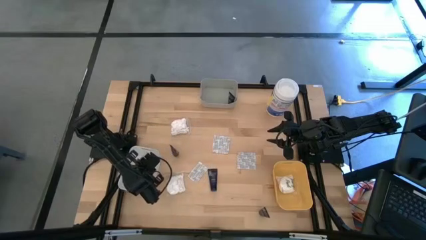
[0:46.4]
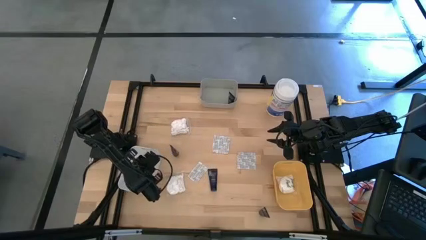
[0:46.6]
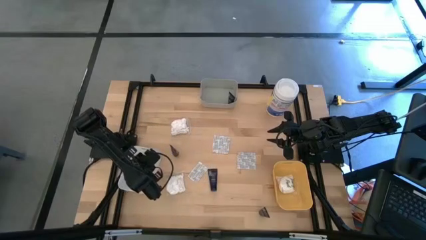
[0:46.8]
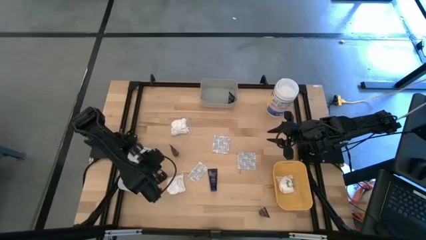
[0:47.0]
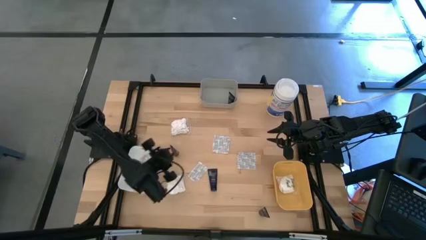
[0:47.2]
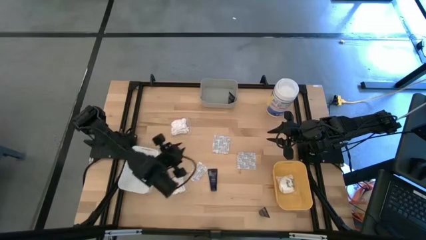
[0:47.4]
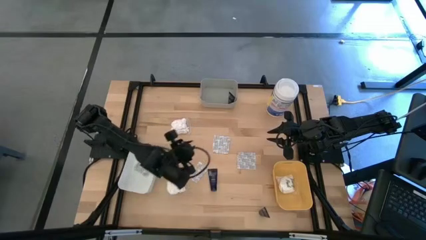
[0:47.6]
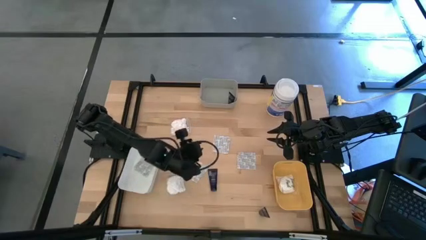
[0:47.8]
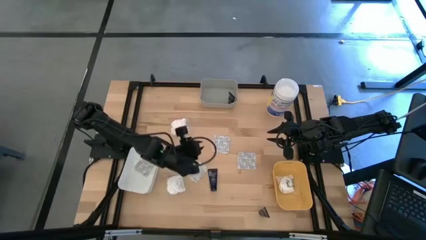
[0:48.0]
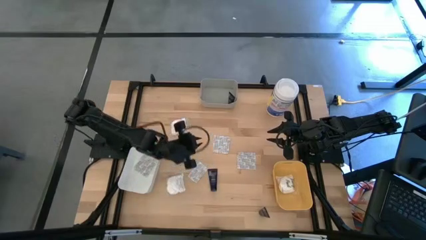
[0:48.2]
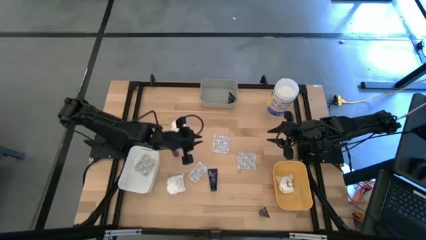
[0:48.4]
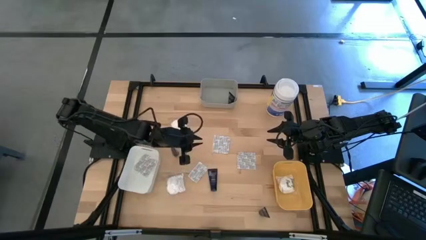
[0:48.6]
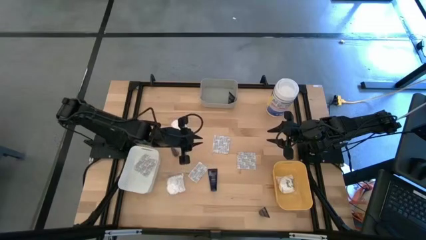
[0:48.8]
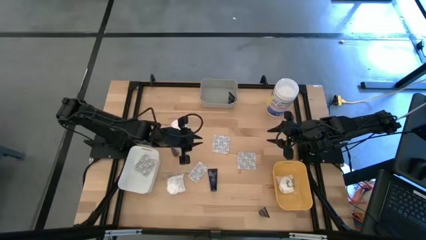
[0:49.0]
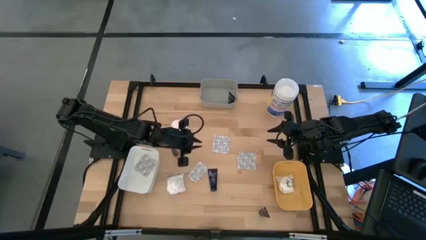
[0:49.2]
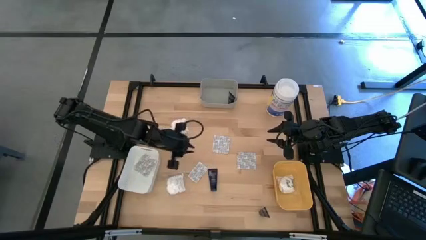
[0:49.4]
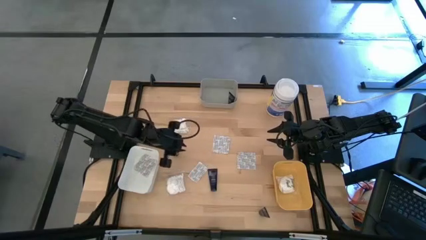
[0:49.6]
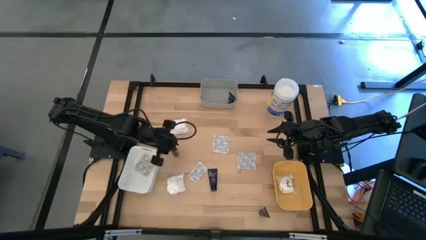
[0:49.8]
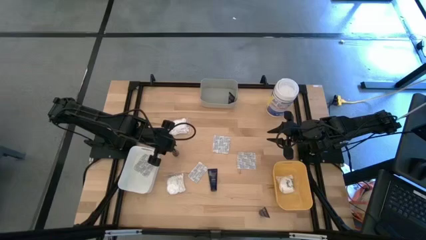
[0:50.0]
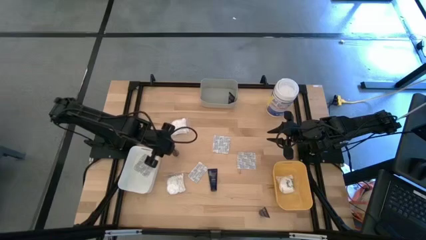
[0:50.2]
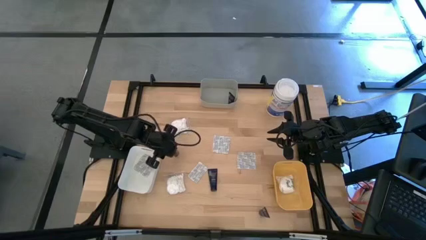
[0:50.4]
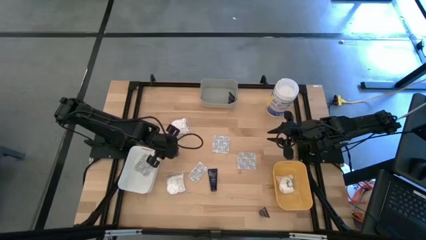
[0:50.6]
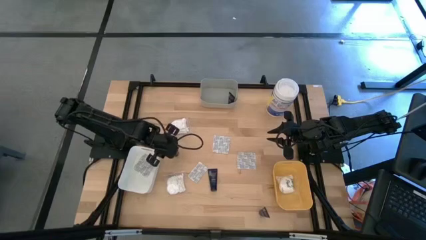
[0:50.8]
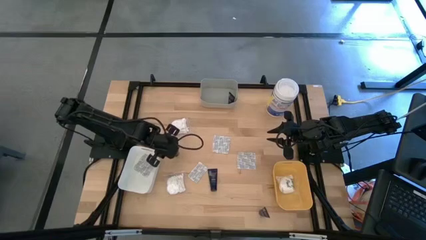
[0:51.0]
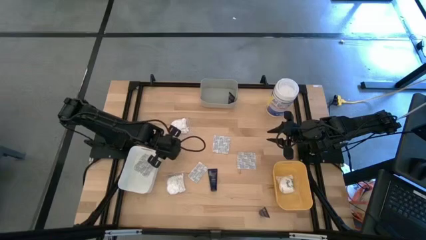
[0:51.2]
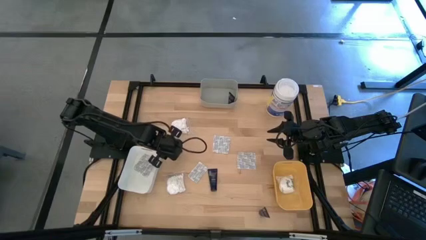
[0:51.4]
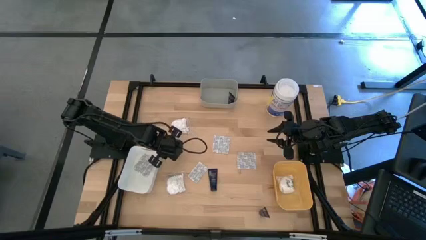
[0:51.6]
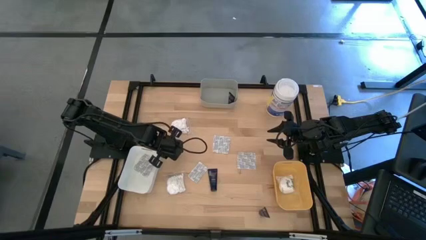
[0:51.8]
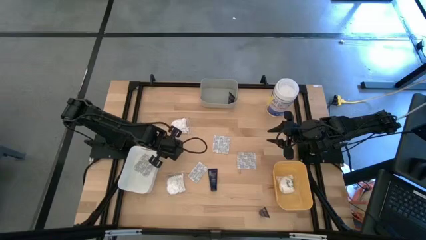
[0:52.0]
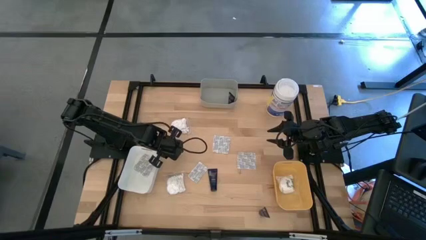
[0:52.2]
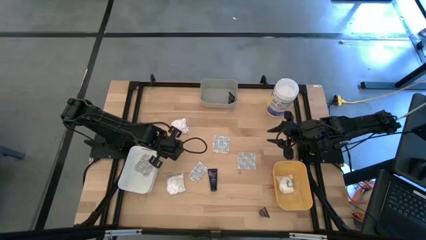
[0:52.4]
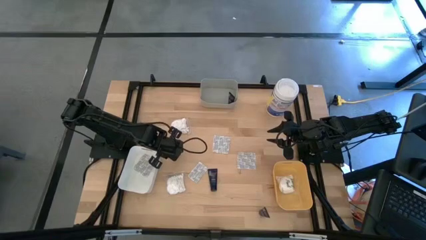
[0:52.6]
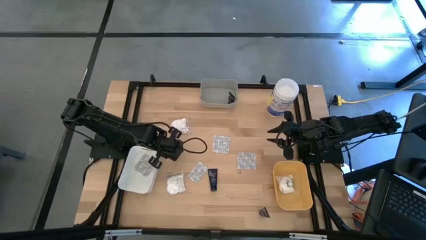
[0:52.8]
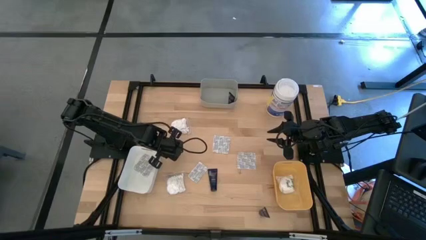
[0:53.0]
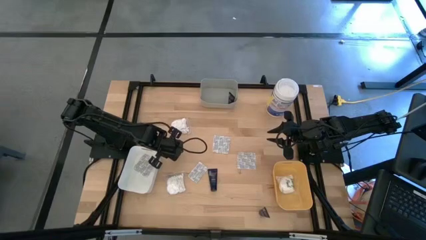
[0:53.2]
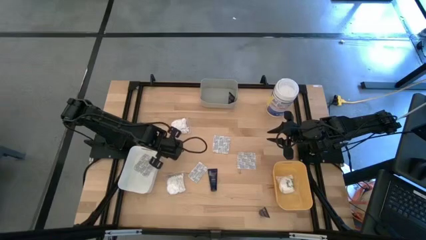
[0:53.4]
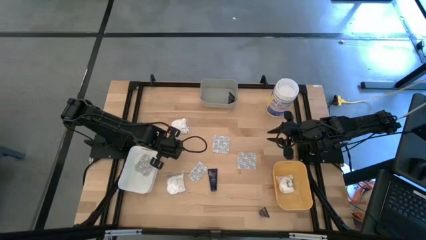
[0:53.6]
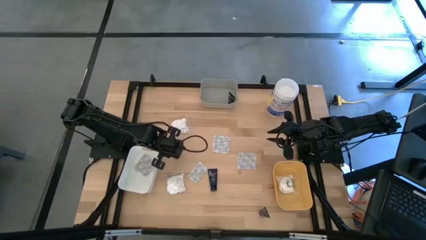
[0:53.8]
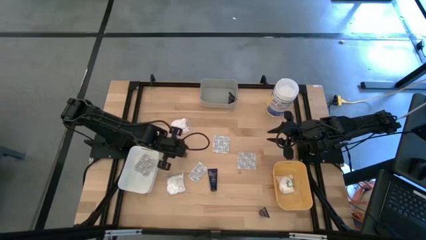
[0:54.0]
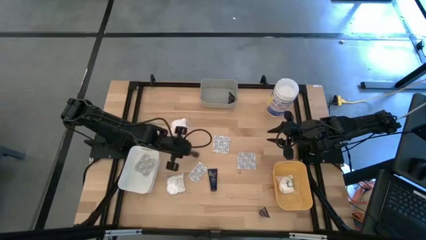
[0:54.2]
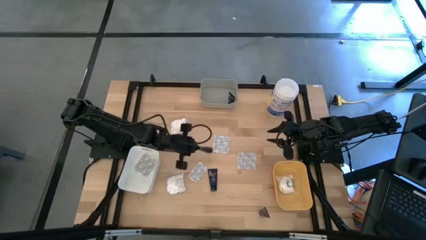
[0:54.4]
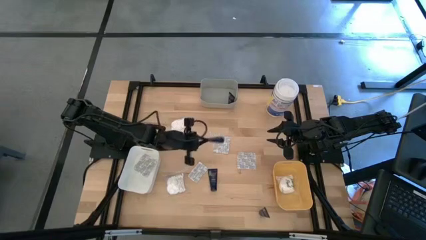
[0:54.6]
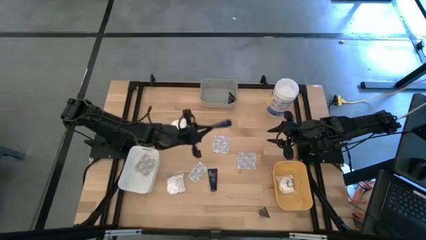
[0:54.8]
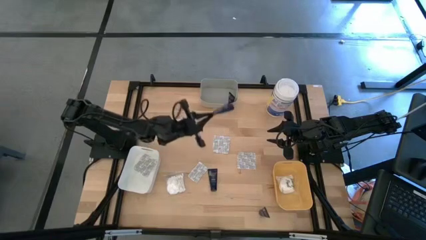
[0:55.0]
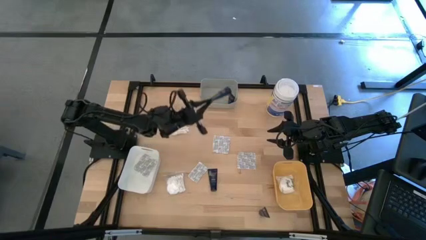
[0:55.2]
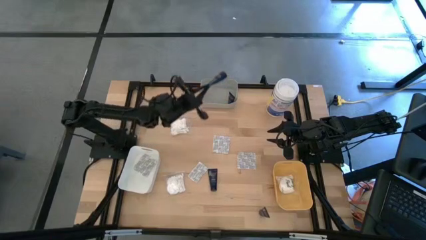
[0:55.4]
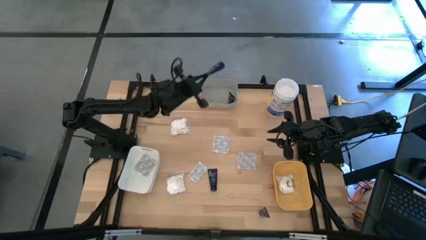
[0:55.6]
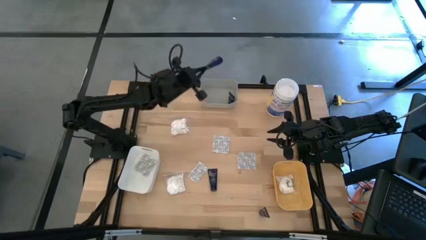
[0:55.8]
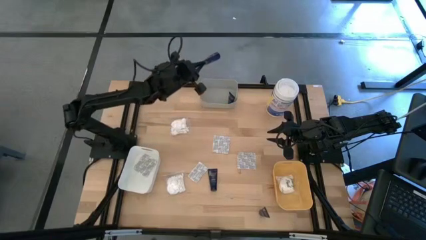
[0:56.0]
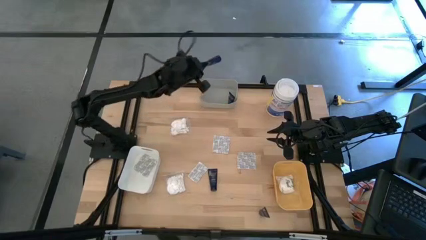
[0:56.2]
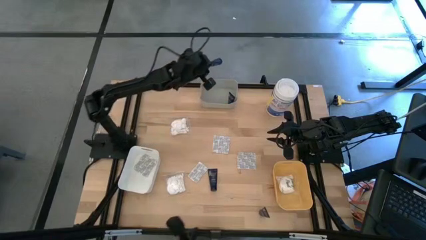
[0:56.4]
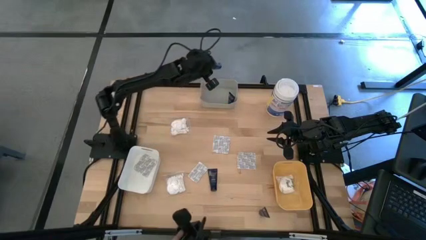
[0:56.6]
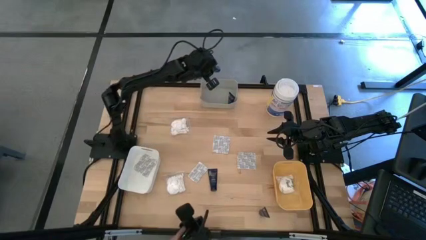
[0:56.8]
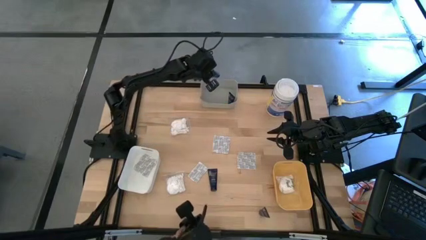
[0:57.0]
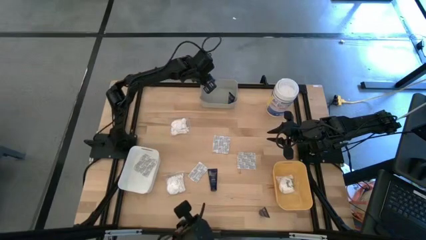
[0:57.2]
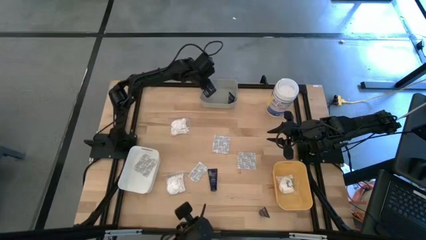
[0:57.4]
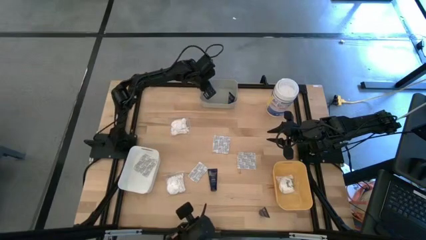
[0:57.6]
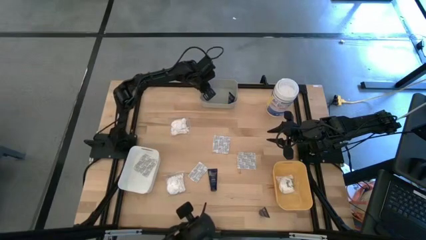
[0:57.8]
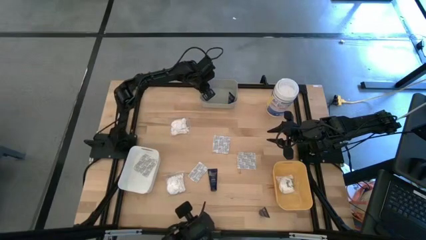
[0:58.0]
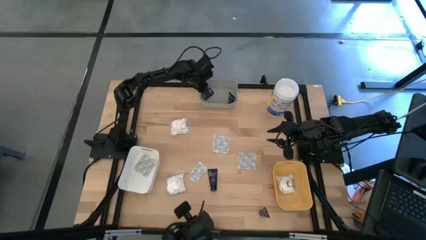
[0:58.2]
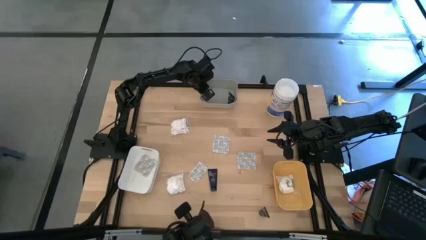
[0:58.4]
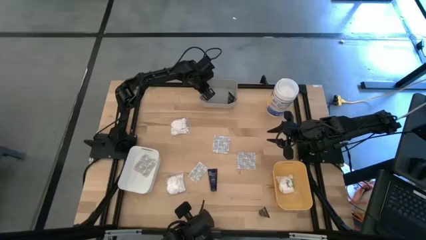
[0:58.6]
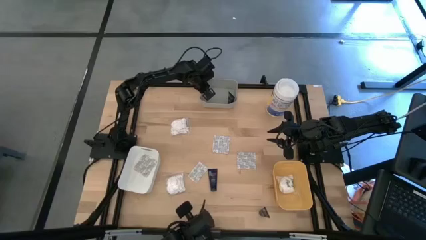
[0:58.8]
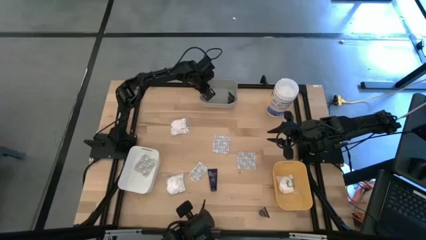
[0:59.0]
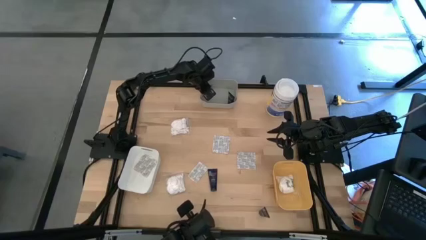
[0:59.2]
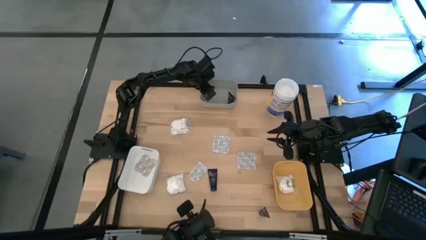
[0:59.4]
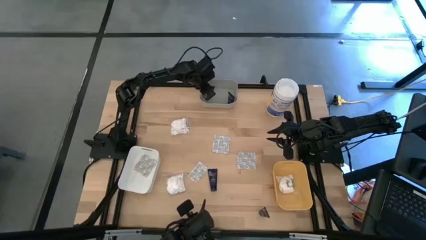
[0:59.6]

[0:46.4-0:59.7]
Task: Pick & Place Travel size toiletries
Put the shave cream into the gray bin

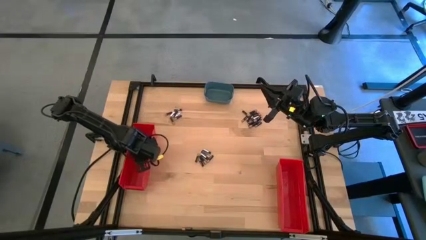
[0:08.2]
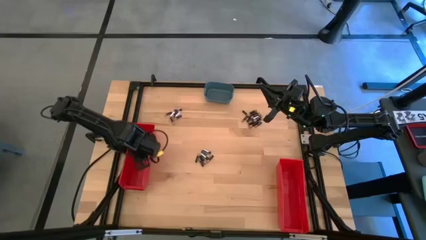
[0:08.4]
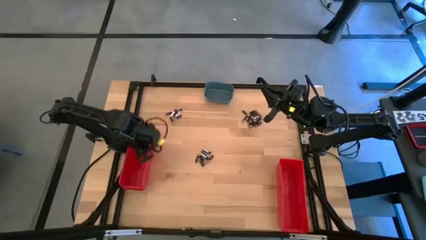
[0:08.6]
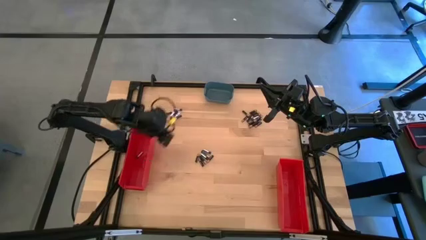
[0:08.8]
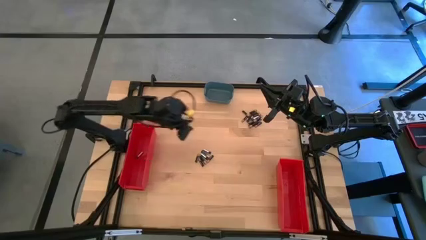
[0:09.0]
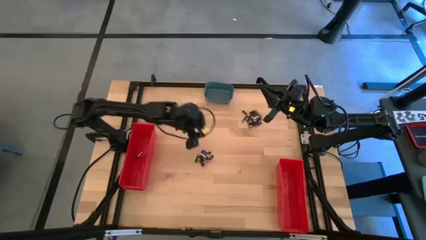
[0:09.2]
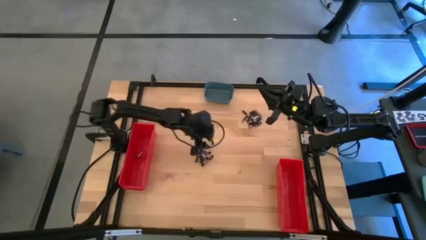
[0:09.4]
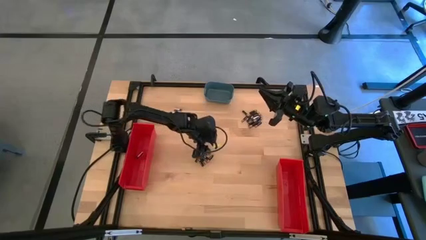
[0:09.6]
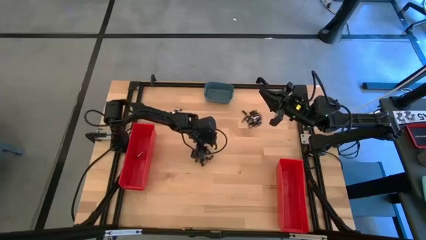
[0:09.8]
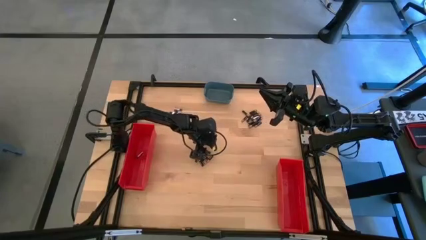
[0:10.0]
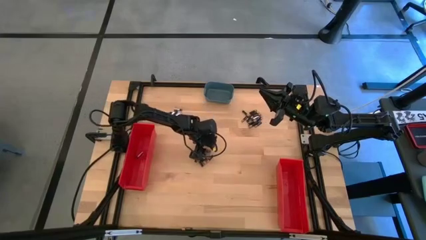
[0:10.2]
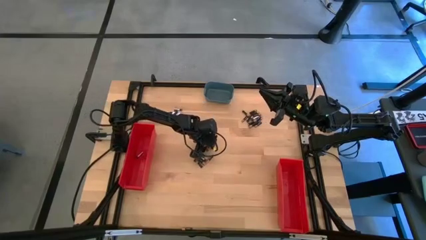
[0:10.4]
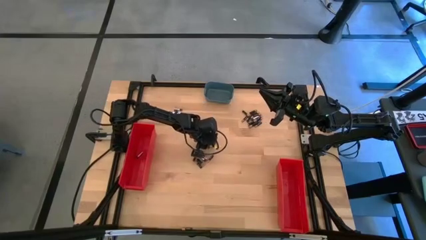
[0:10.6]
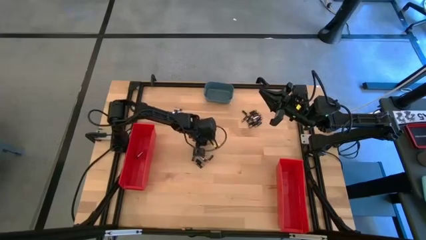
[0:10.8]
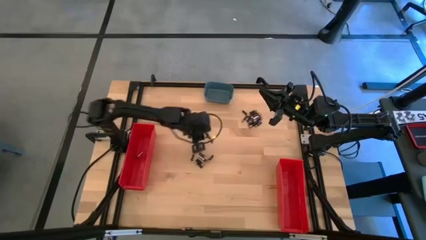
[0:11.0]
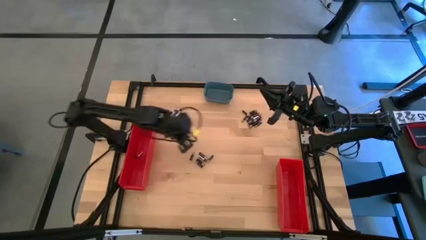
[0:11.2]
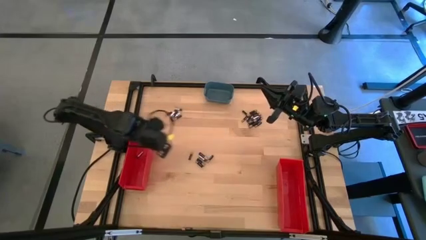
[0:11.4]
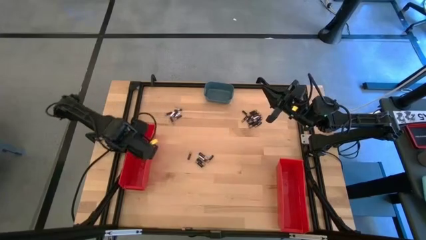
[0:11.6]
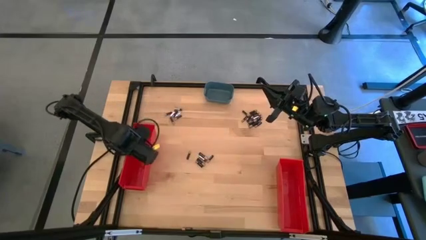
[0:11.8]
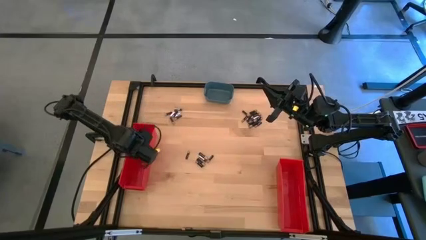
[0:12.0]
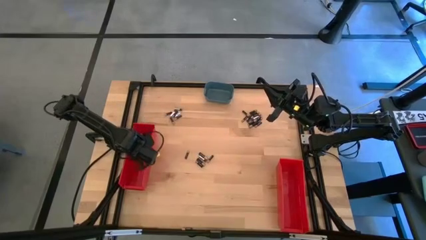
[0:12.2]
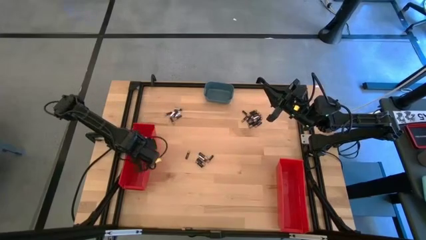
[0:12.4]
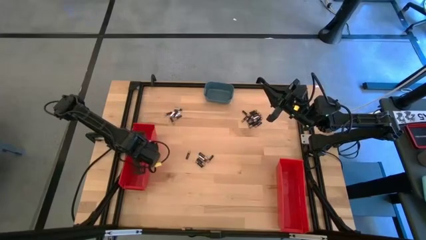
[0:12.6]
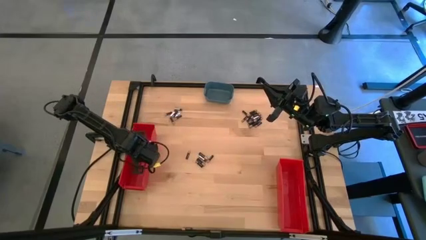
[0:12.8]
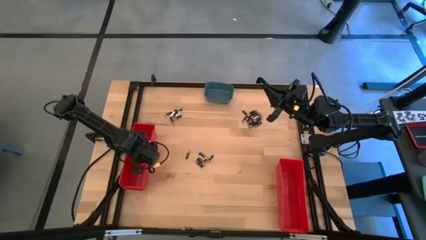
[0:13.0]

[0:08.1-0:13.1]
Task: Sort batteries
Put the silver battery into the left red bin
